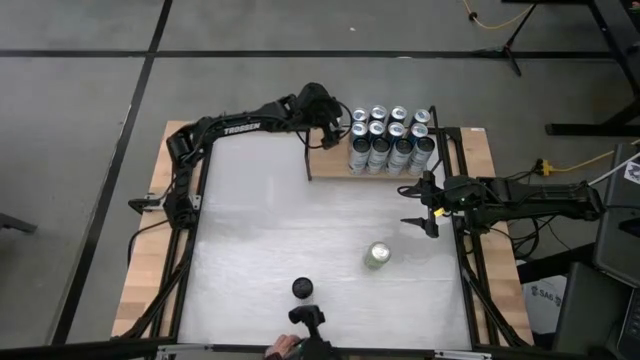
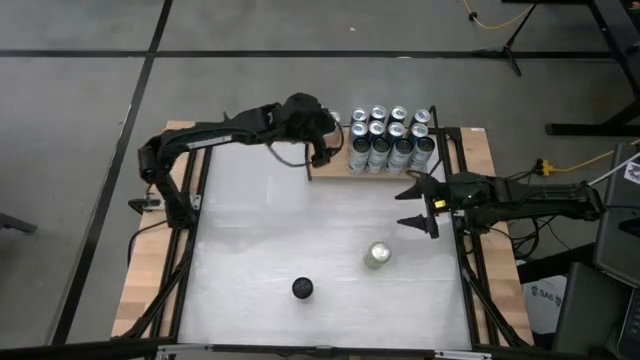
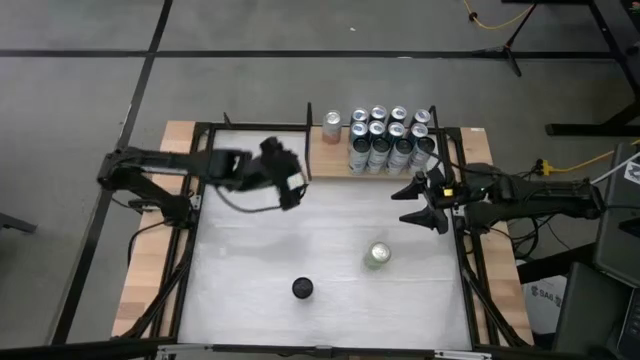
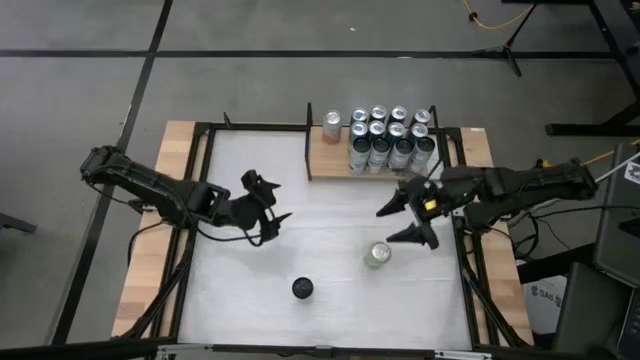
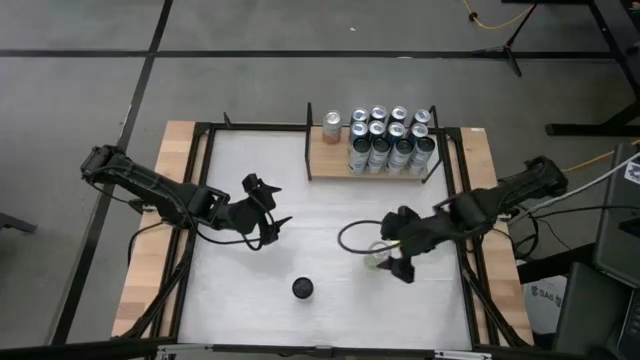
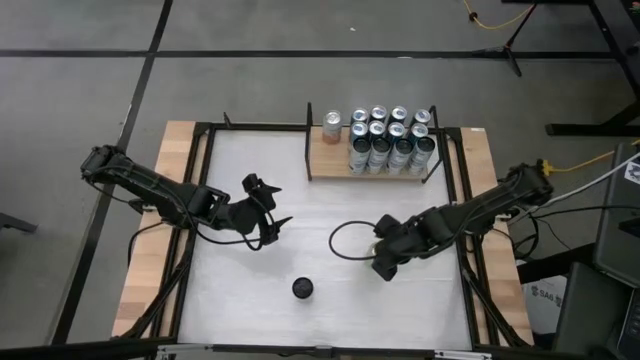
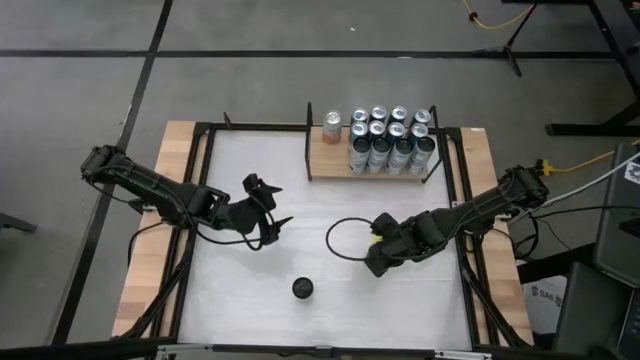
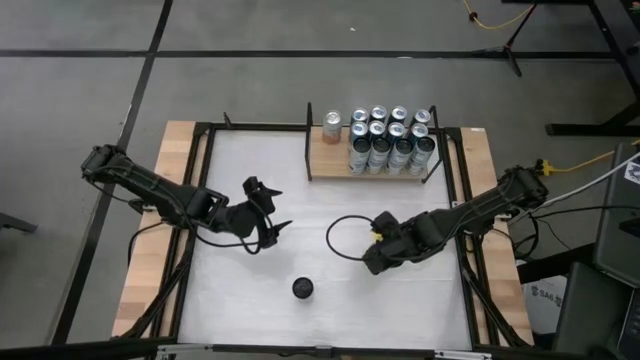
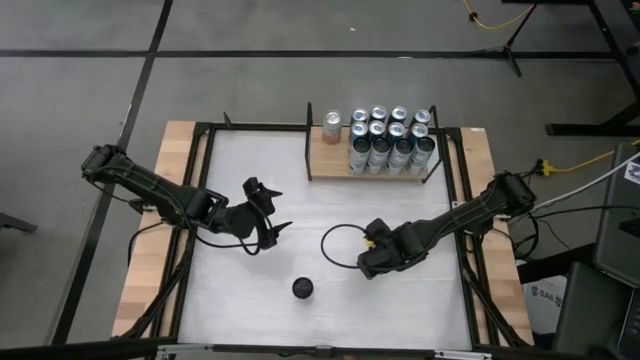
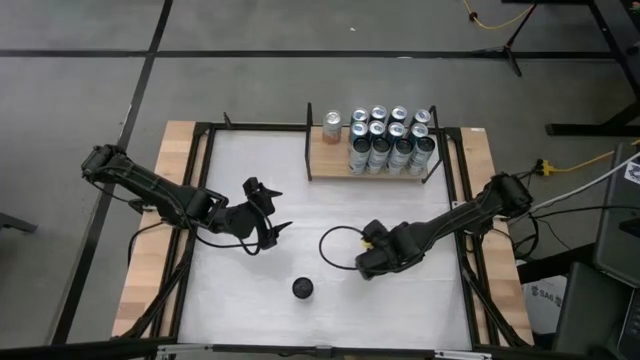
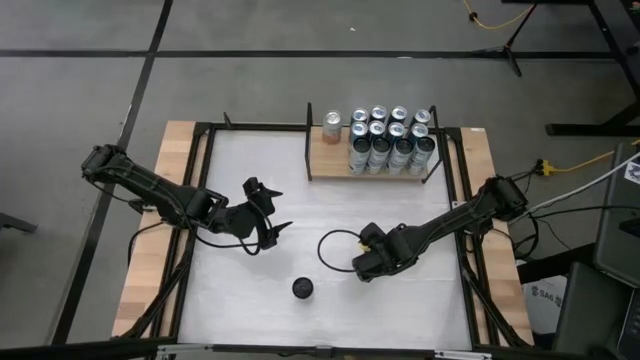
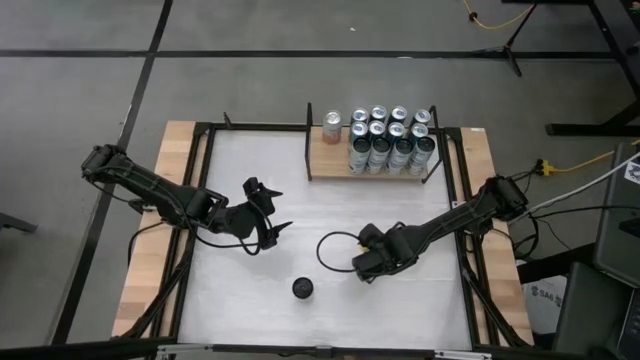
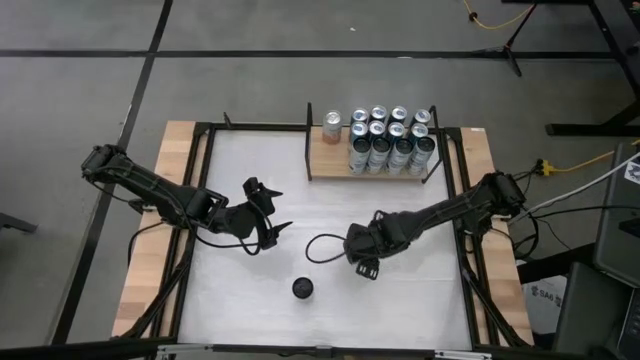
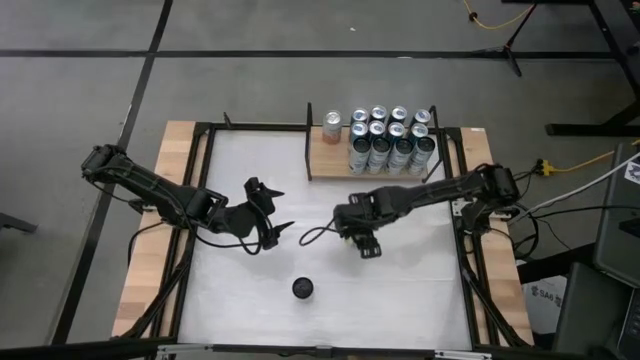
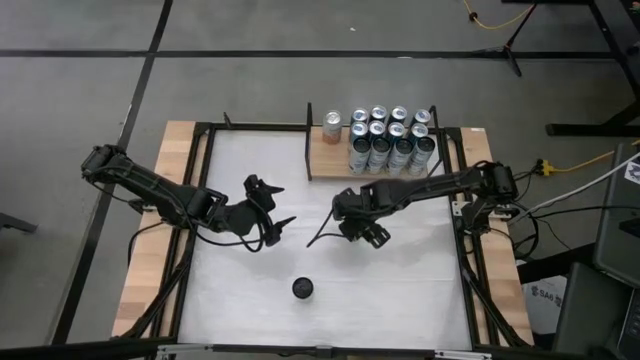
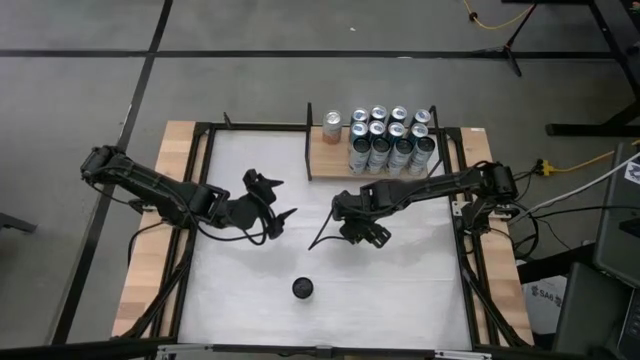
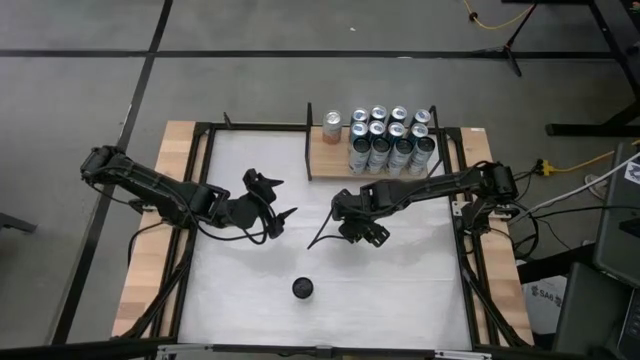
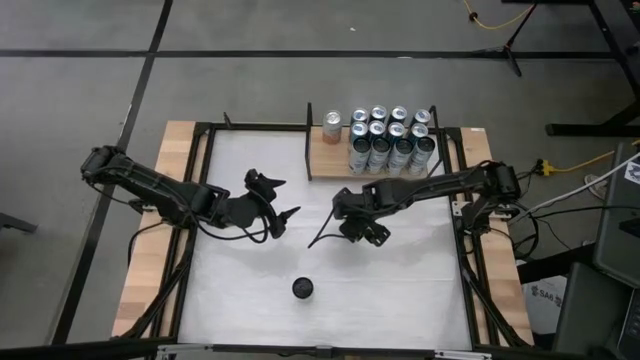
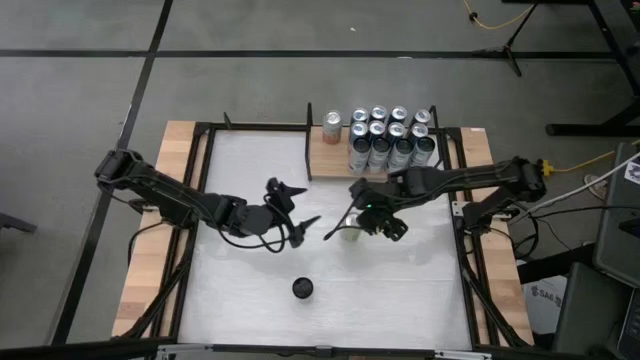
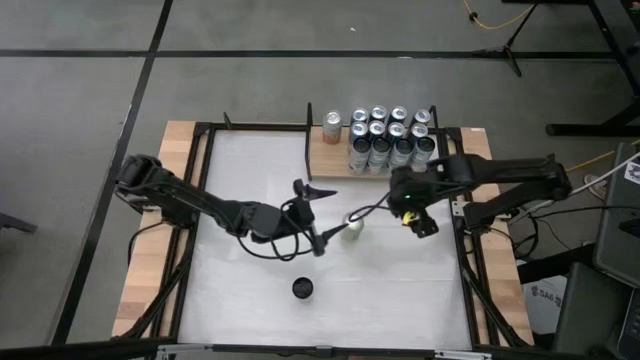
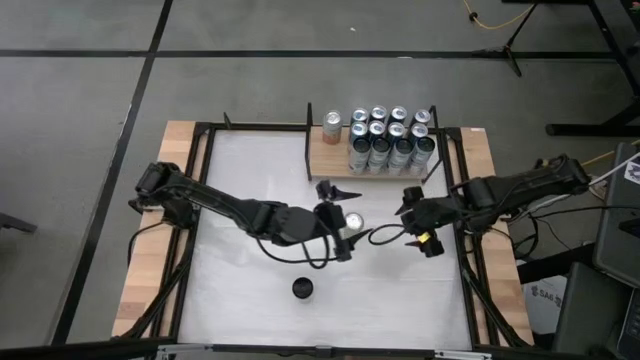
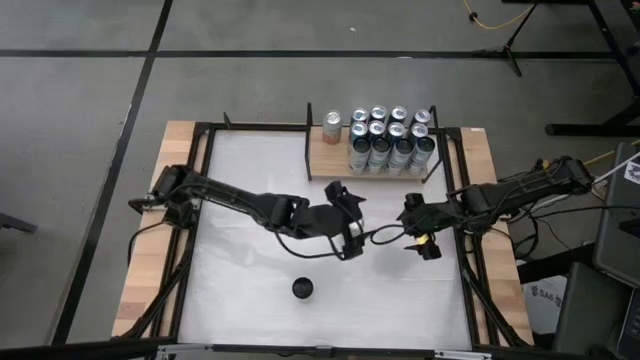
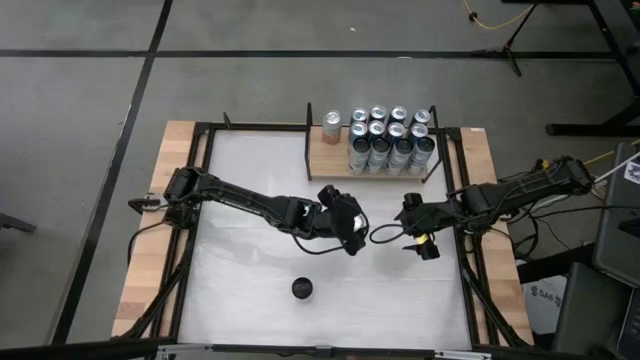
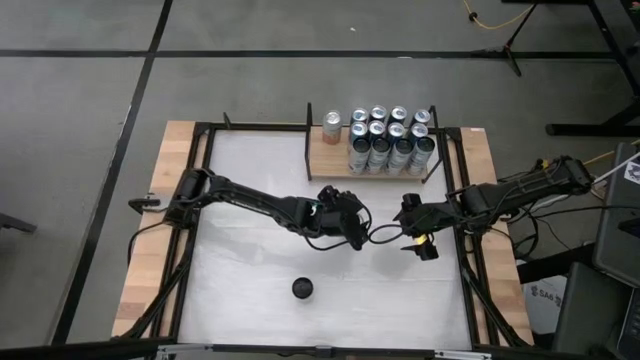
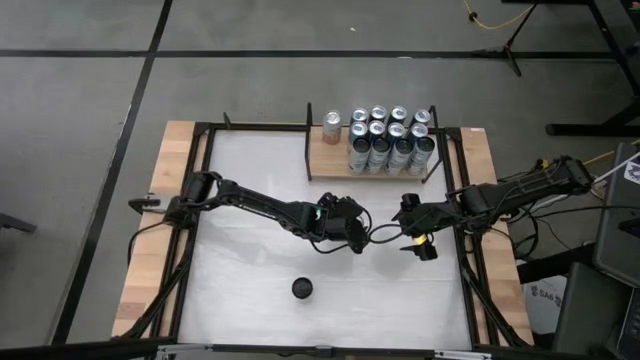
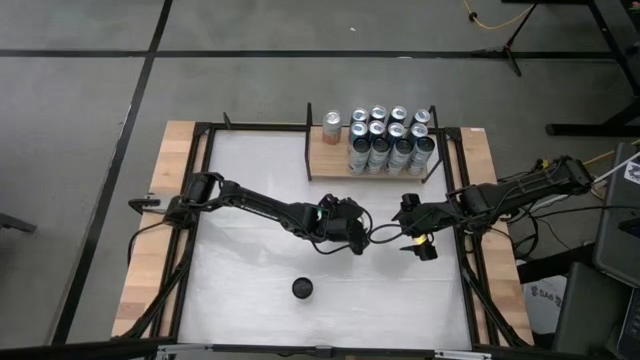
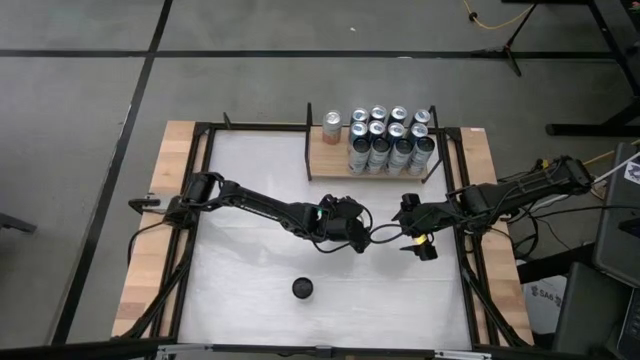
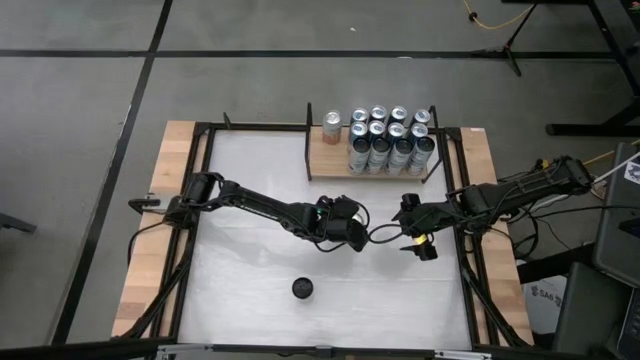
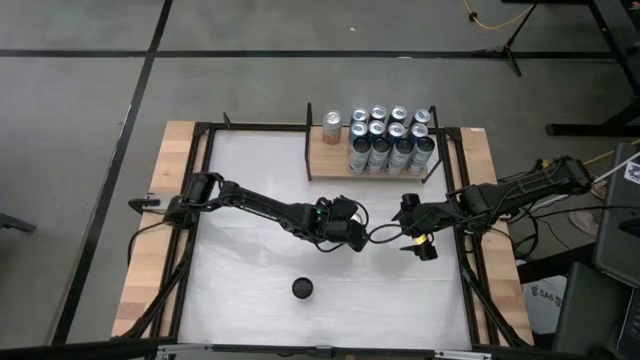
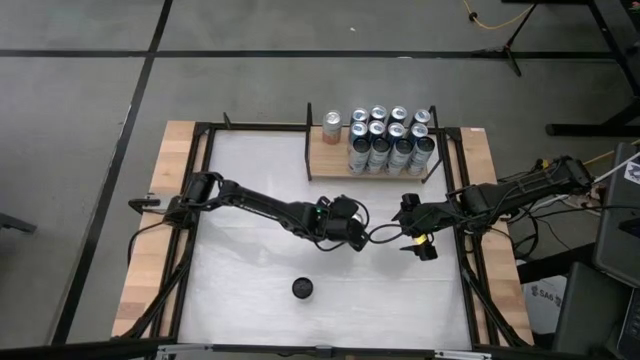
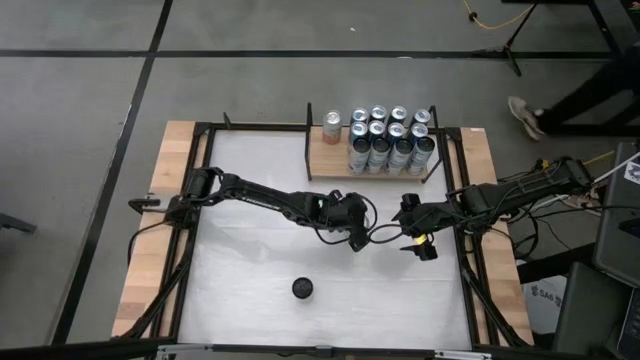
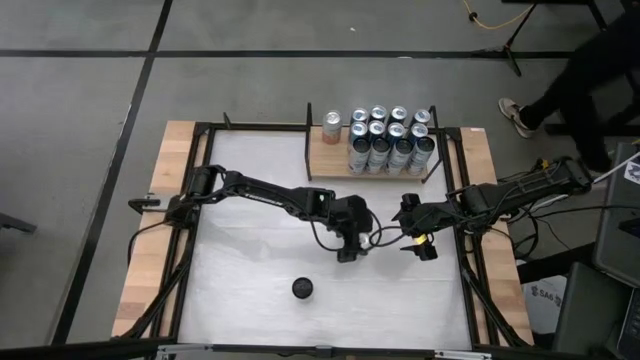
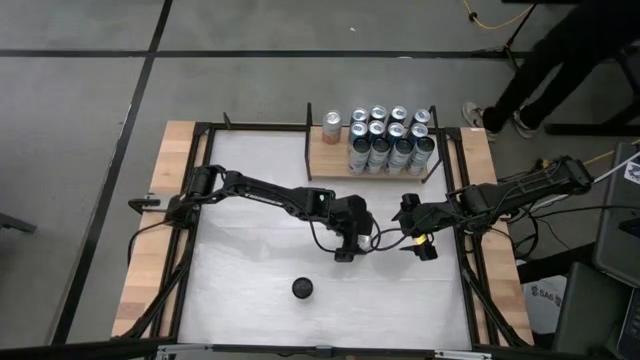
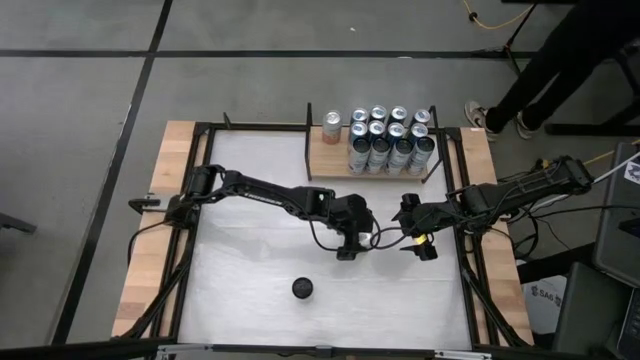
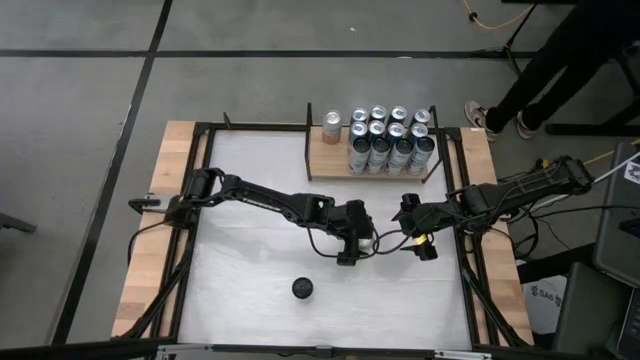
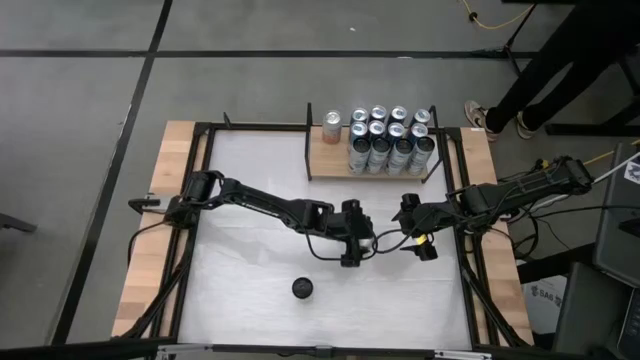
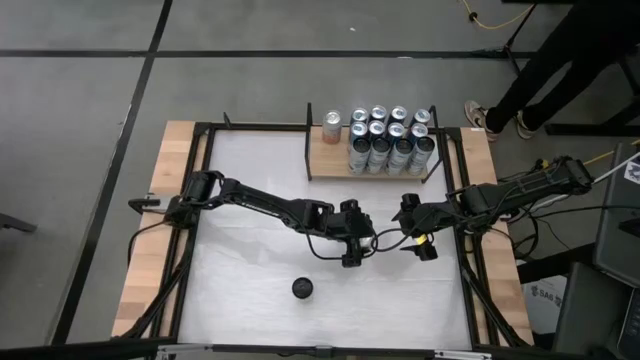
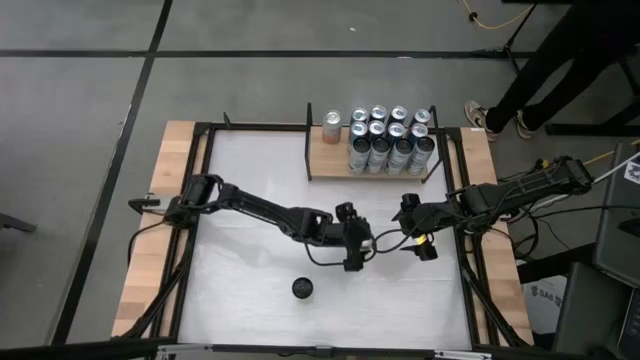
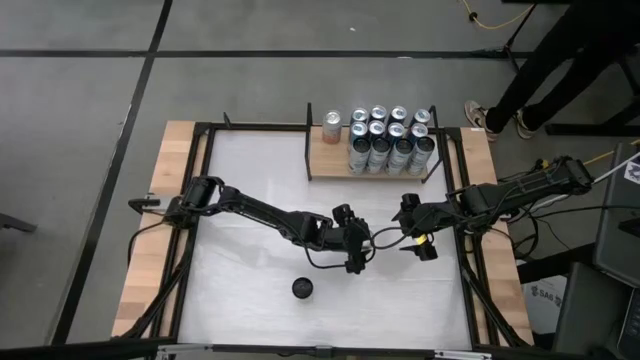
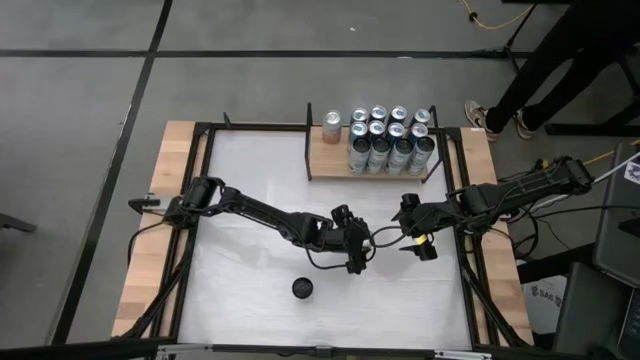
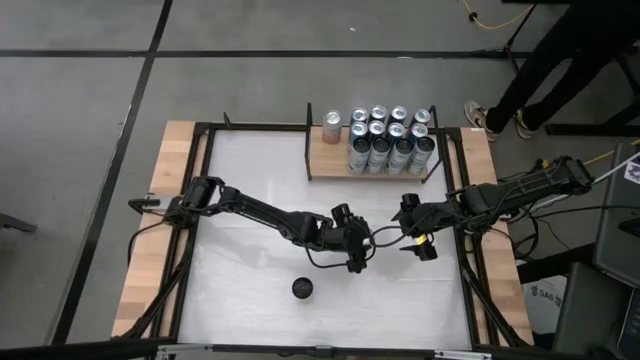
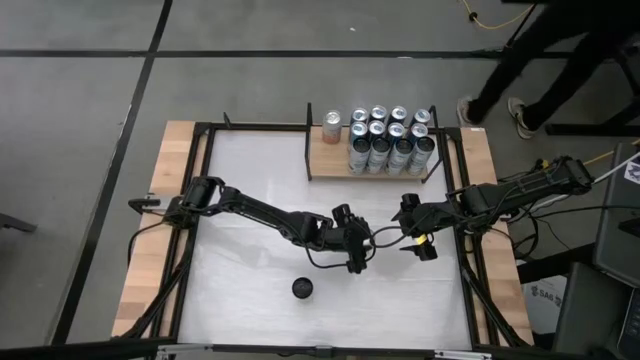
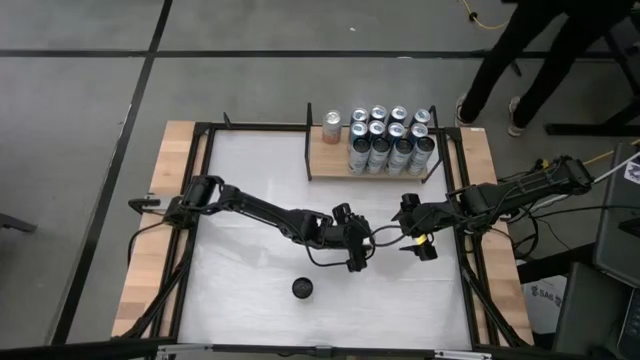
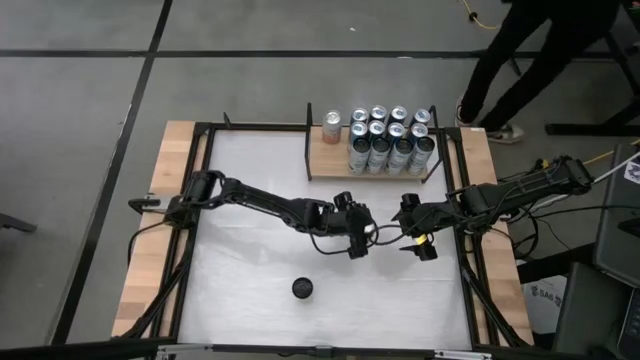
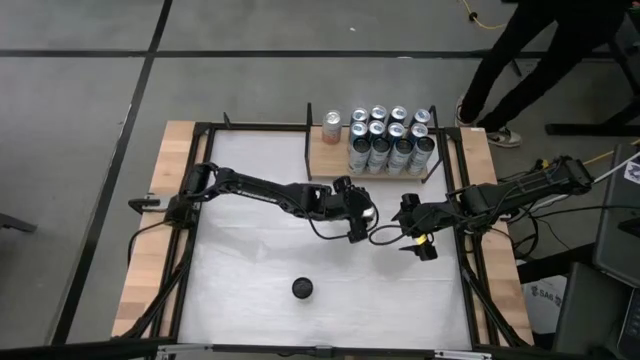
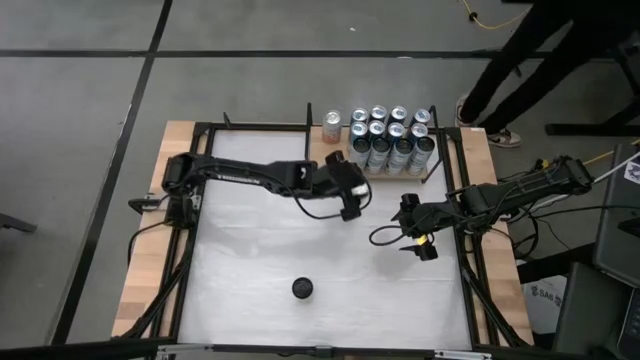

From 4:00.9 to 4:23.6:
Task: Place canned beverage on shelf
Put the green soda can on the shelf
